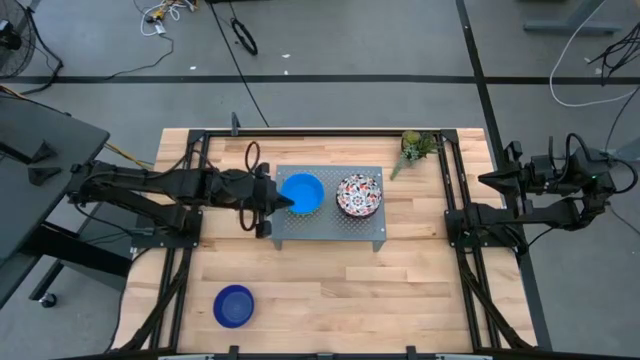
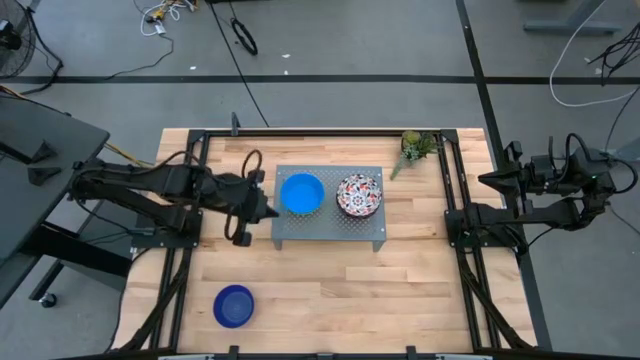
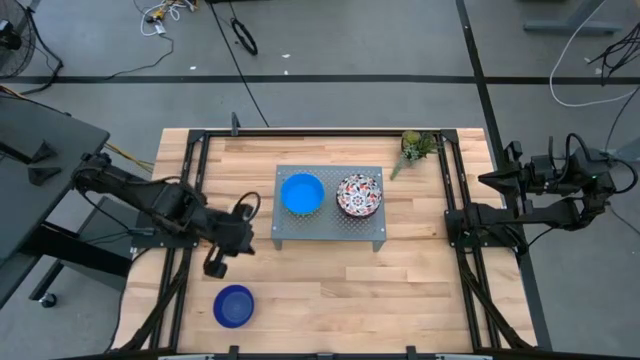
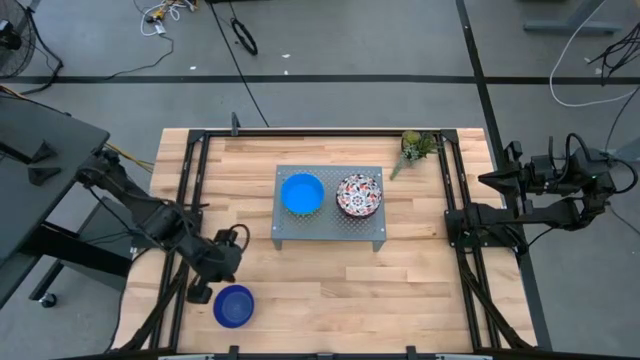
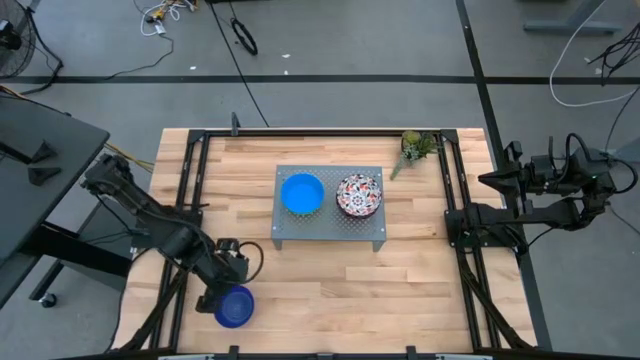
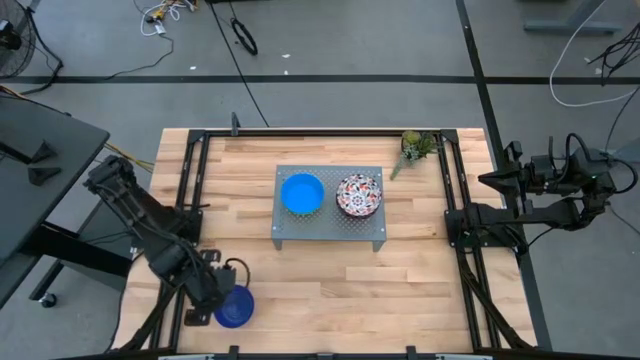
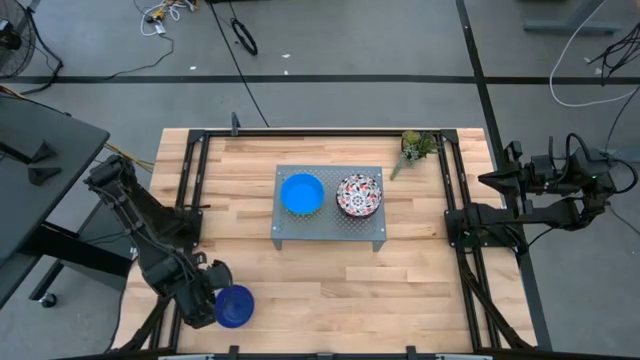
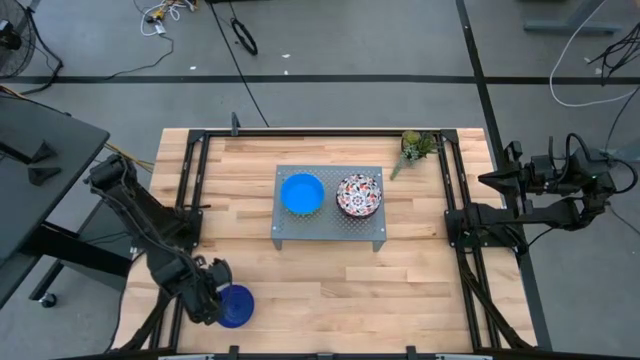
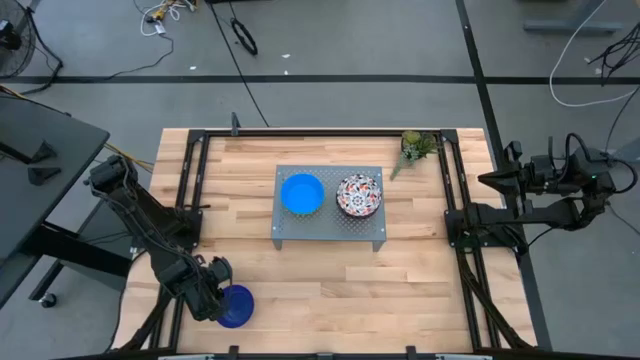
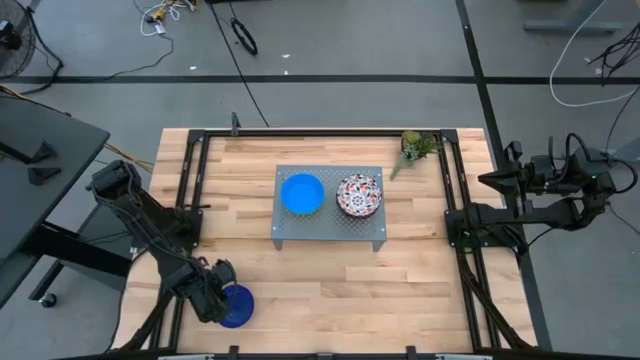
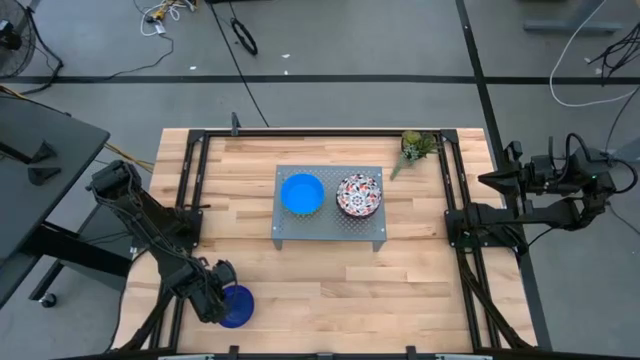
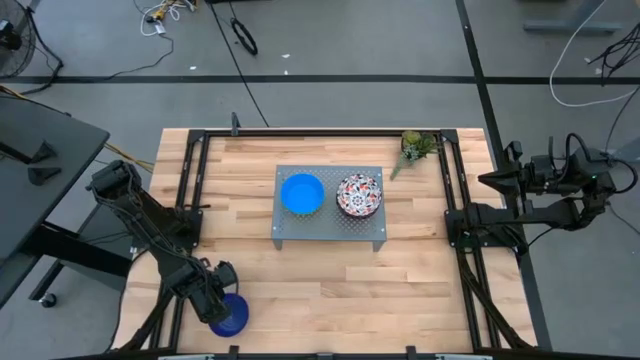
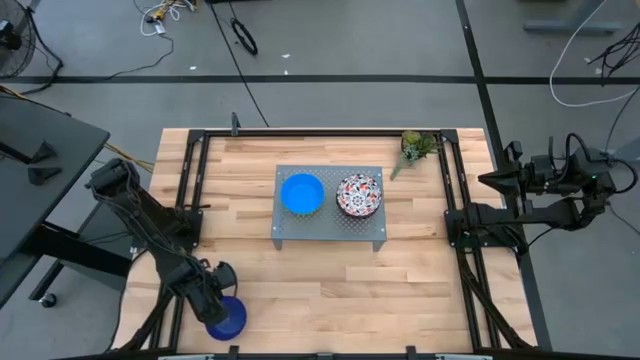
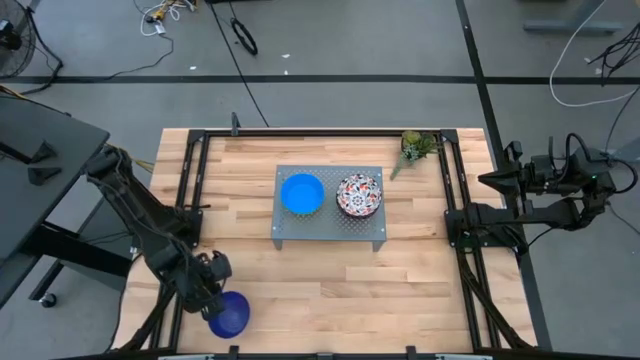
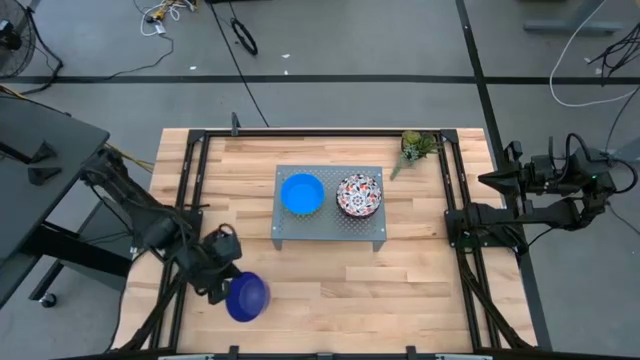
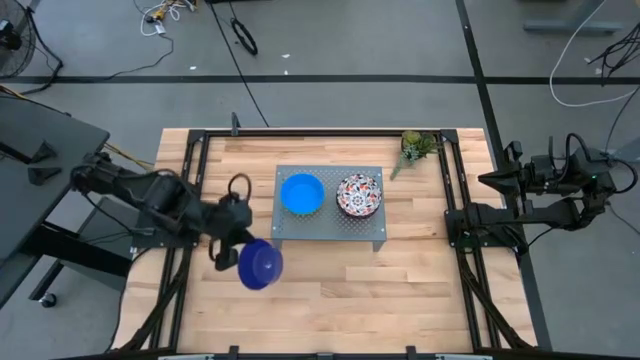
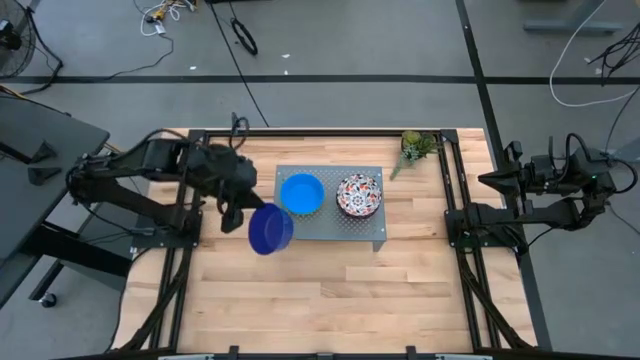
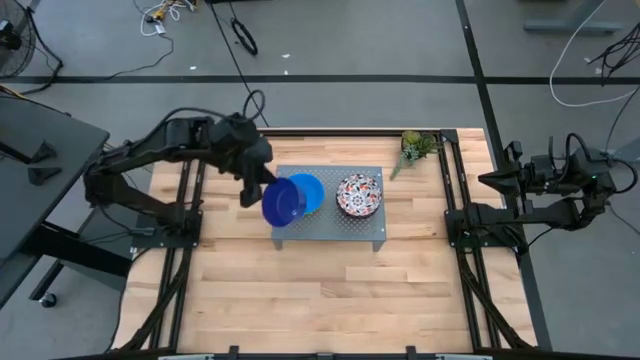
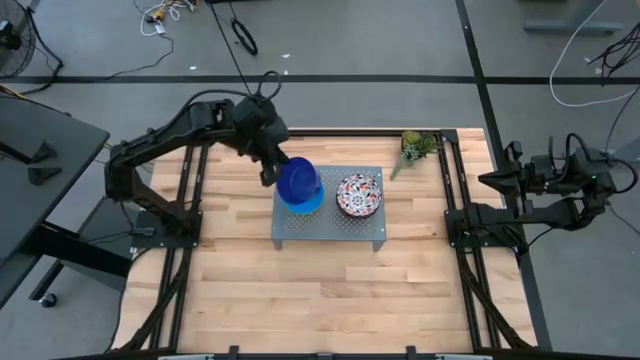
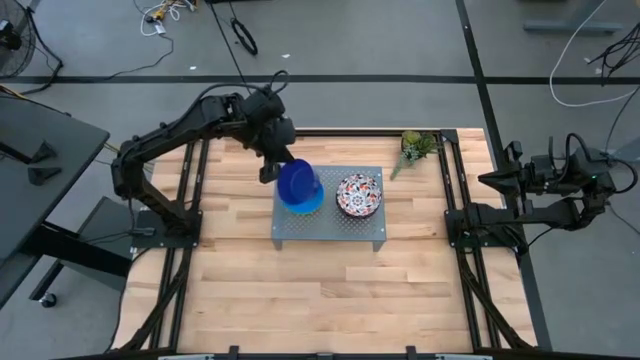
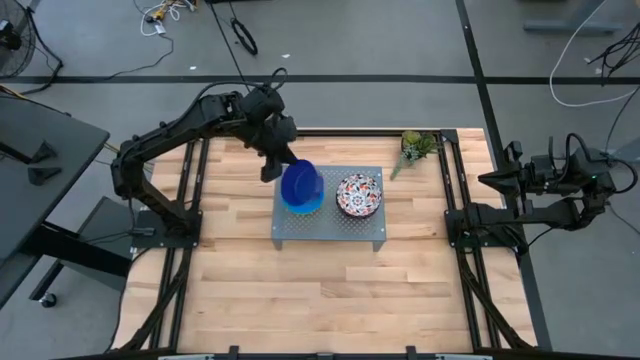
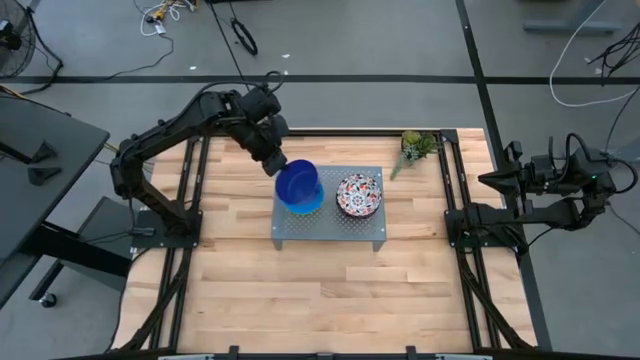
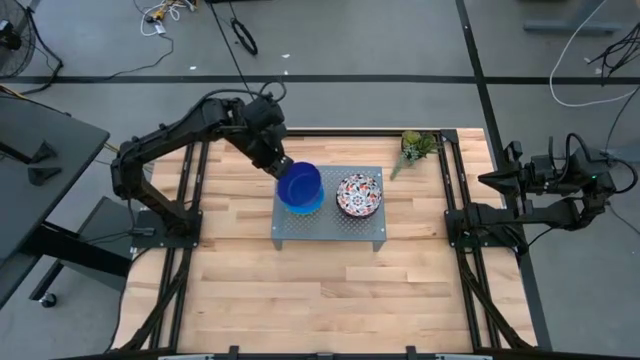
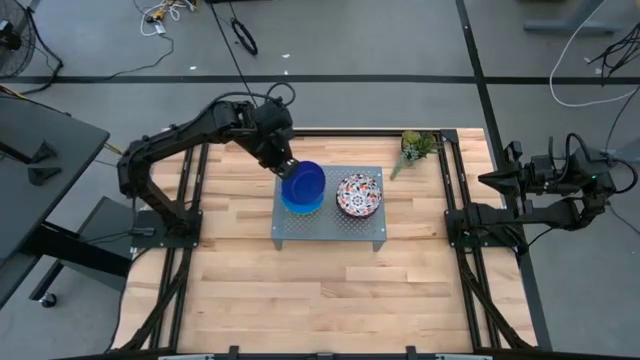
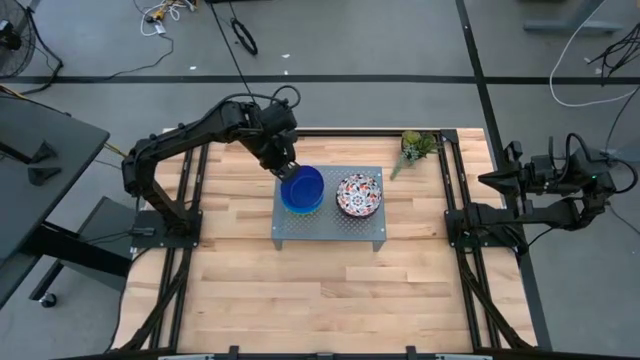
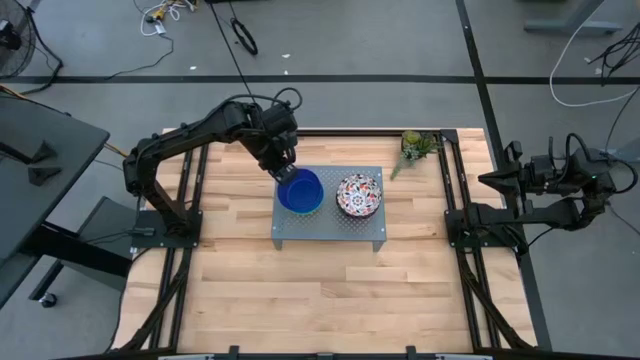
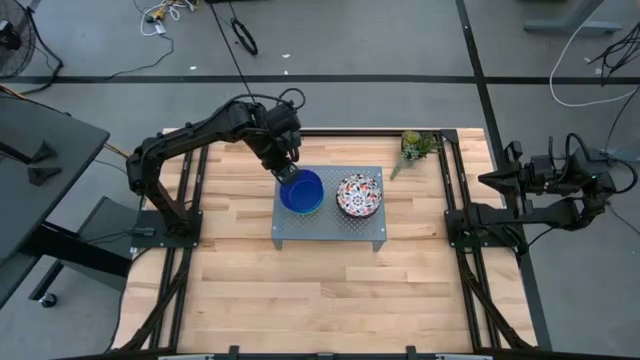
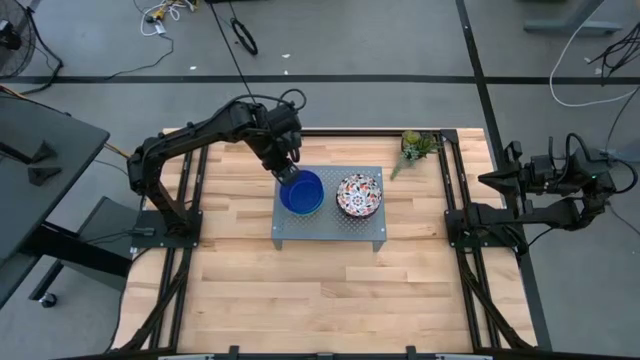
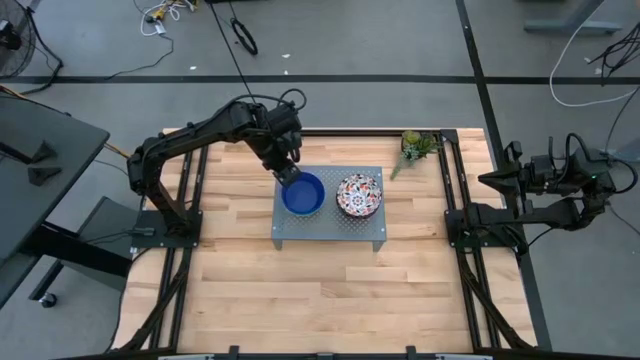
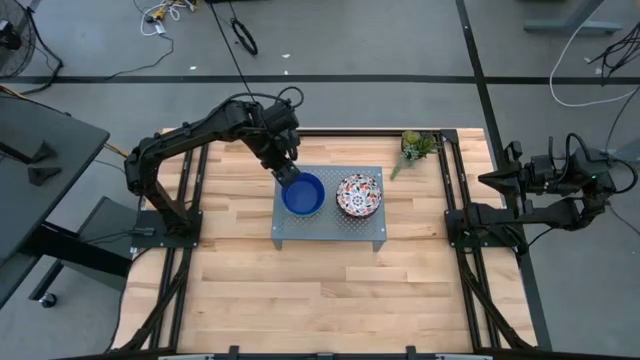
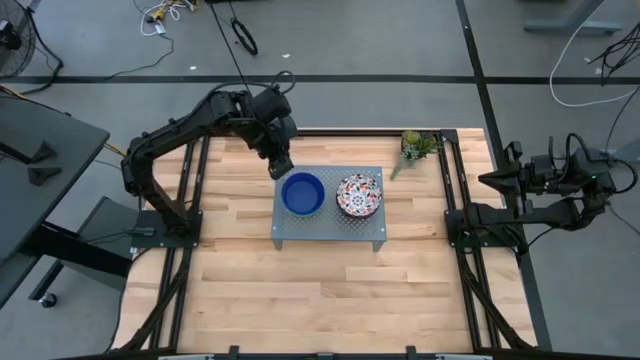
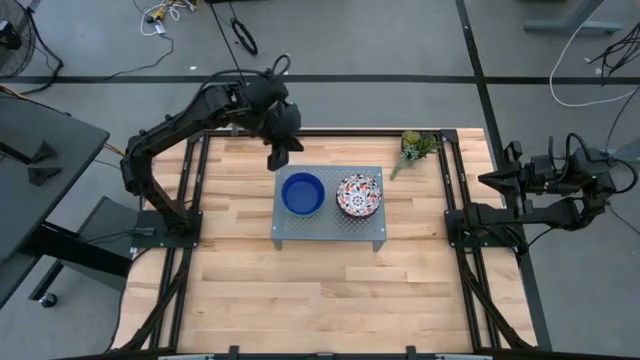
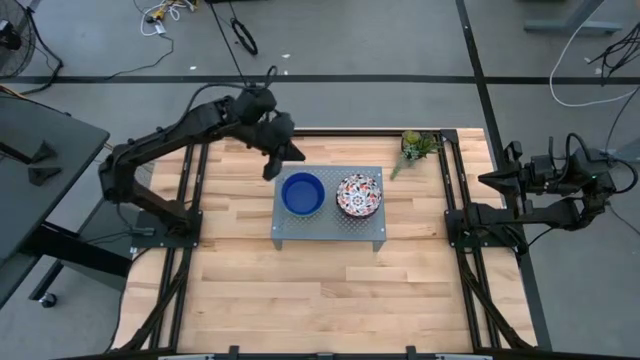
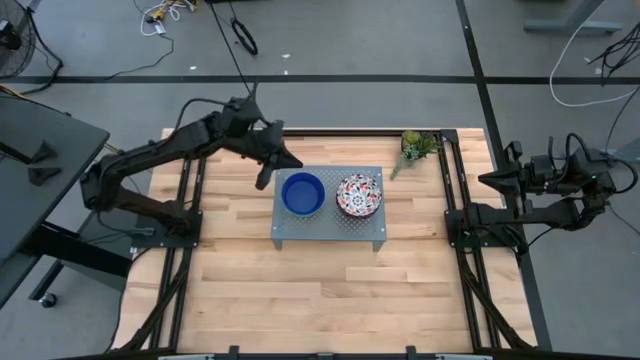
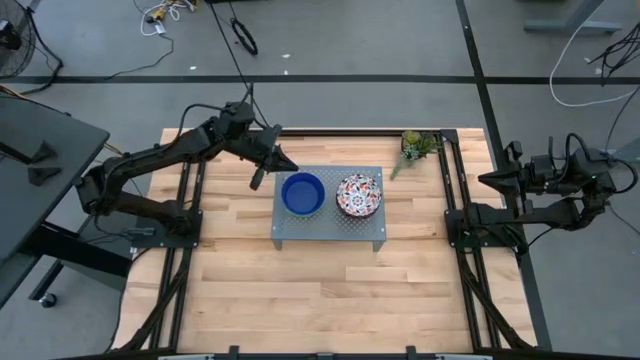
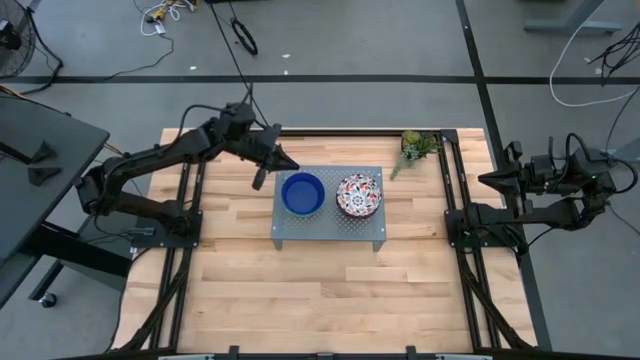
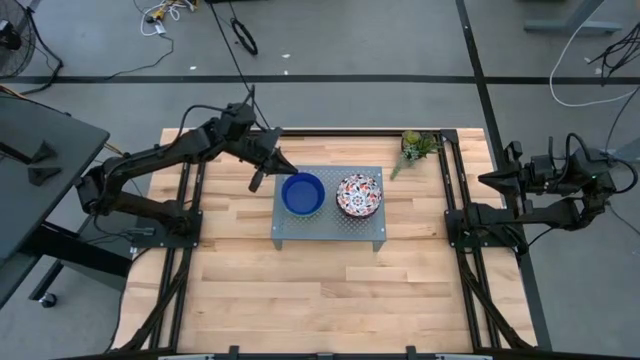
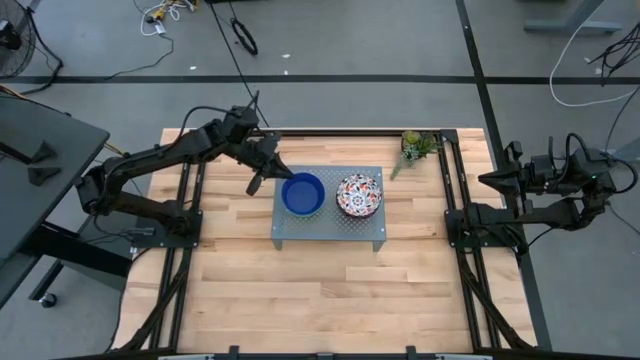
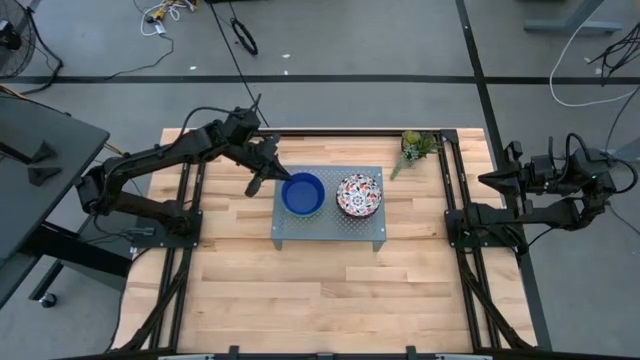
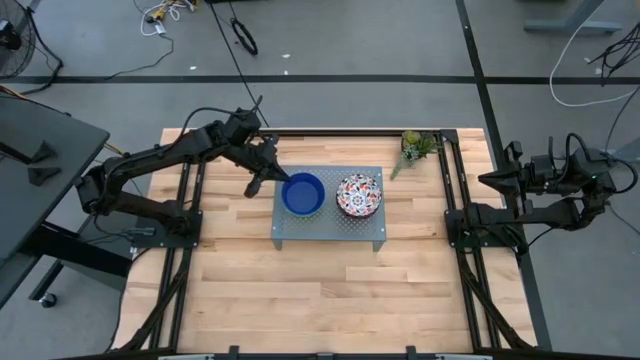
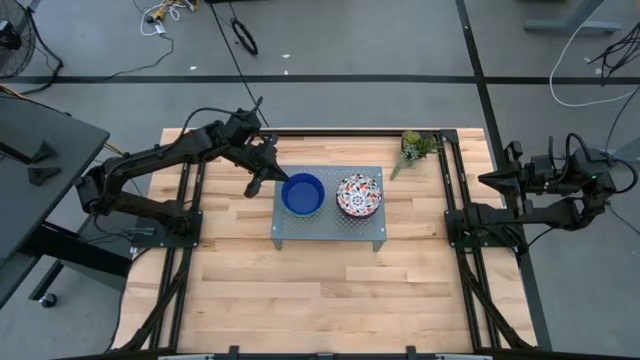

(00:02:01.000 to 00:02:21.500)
Task: Pick & Place Mini bowls
Stack the dark blue bowl on top of the other light blue bowls on the shelf

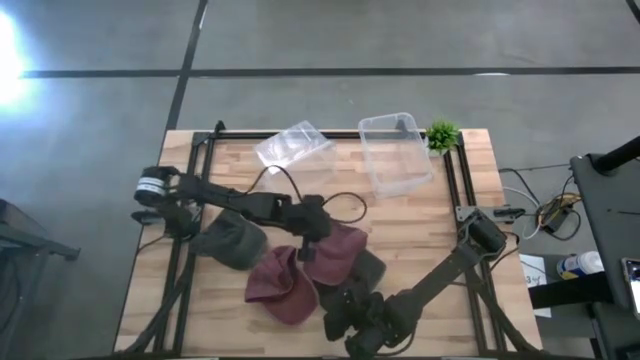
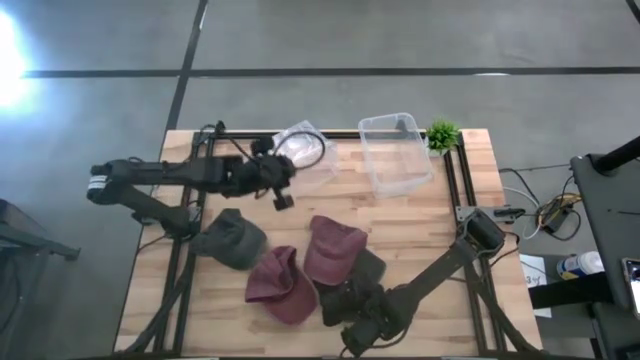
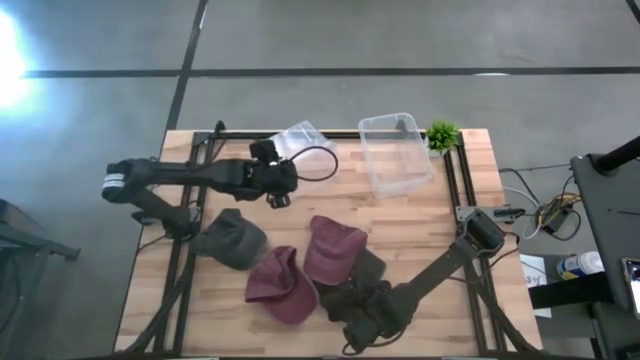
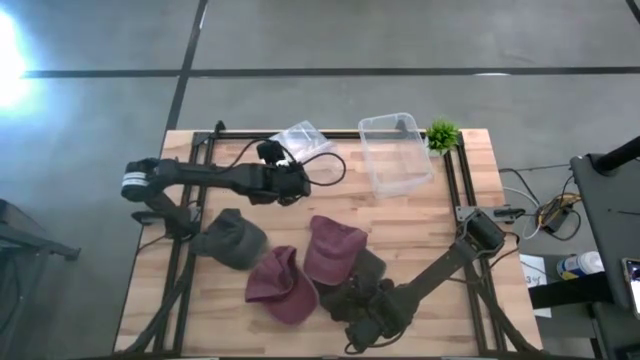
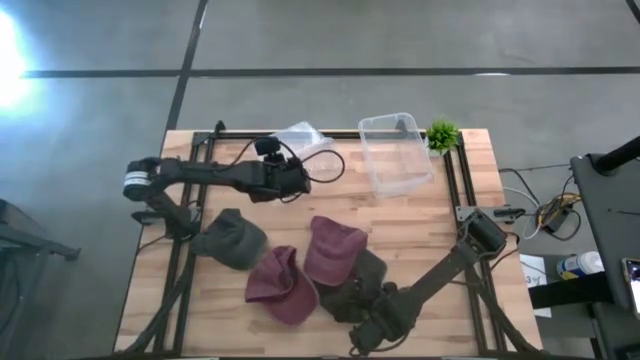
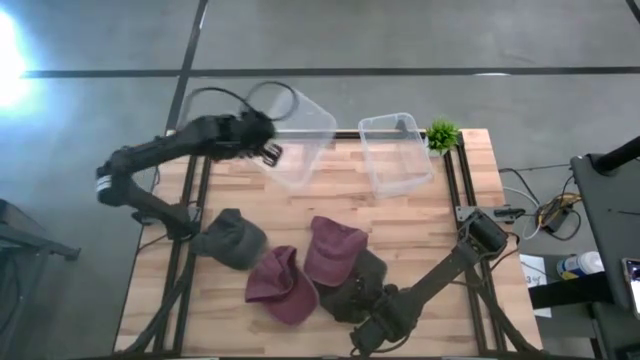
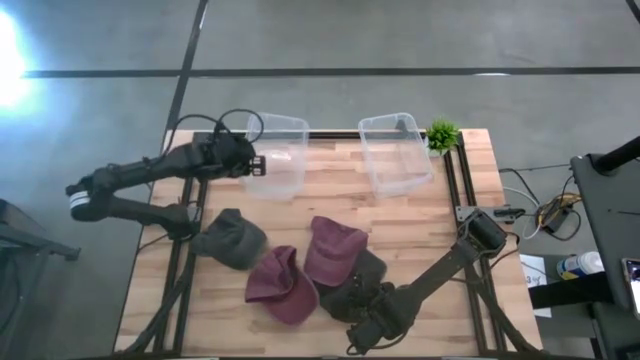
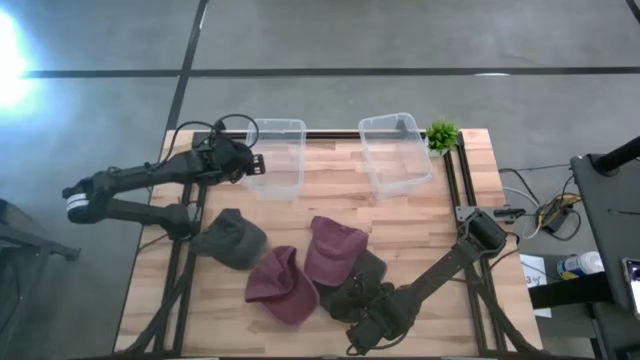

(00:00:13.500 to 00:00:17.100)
Task: Pick & Place hat
Adjust the left transparent bin on the table
